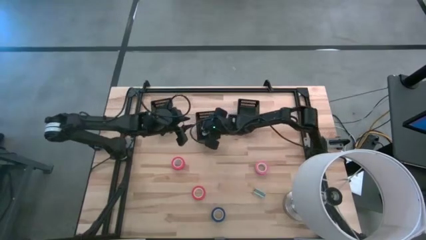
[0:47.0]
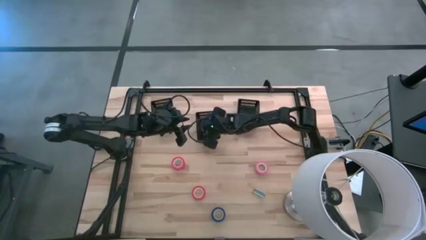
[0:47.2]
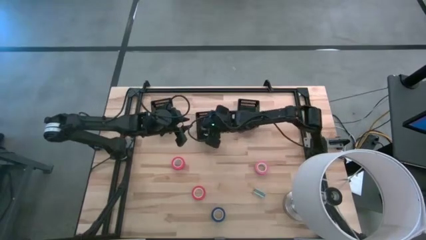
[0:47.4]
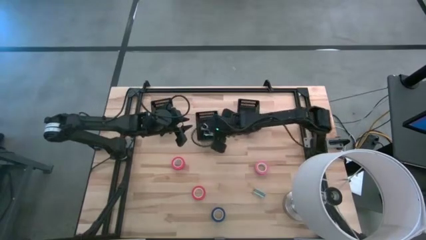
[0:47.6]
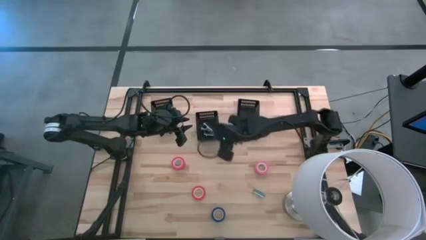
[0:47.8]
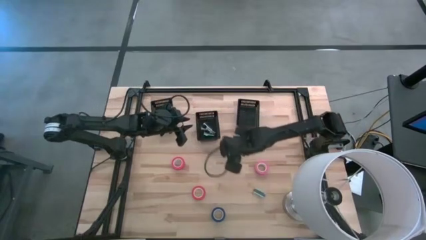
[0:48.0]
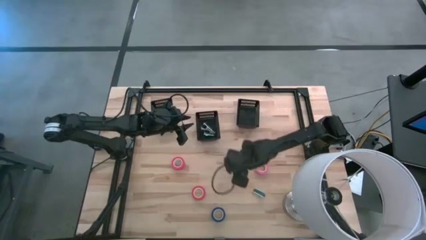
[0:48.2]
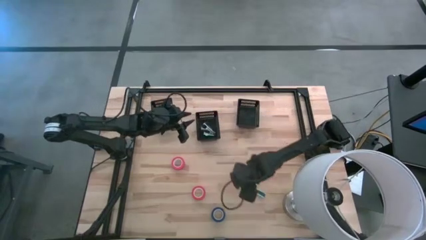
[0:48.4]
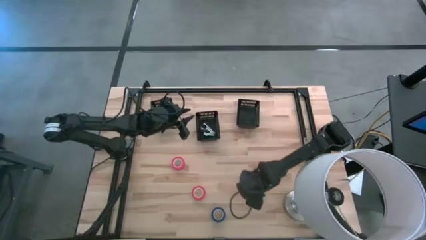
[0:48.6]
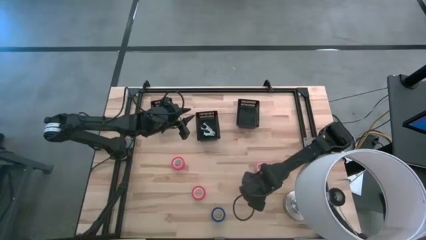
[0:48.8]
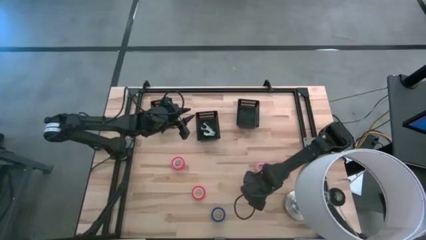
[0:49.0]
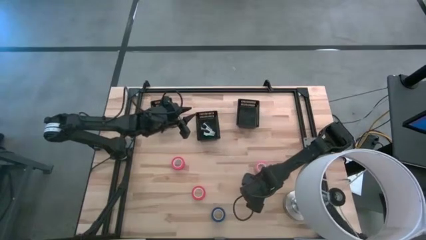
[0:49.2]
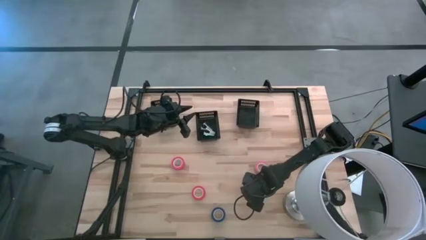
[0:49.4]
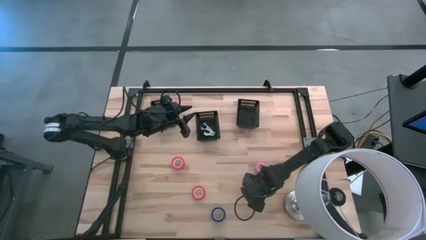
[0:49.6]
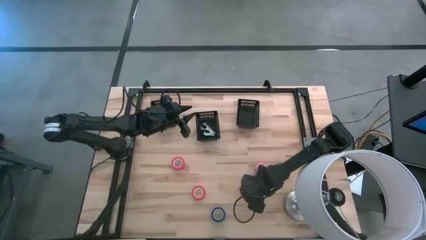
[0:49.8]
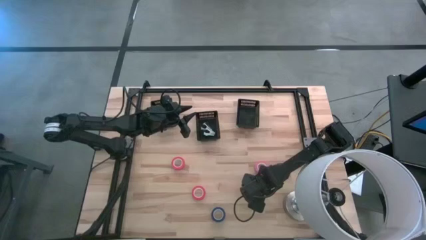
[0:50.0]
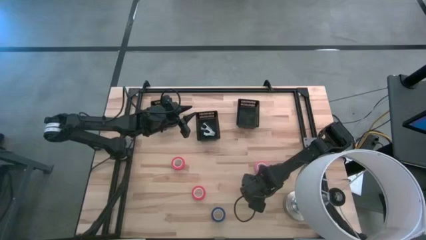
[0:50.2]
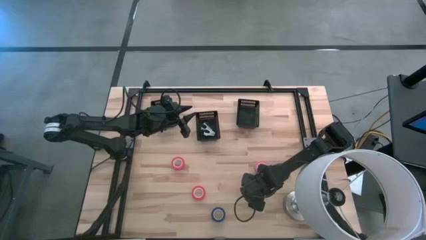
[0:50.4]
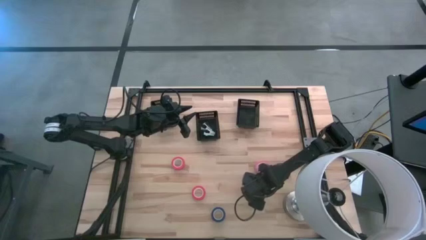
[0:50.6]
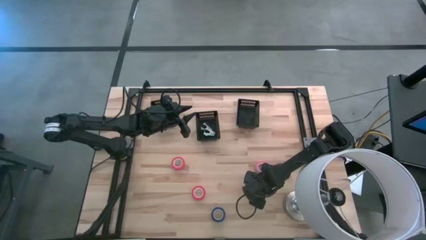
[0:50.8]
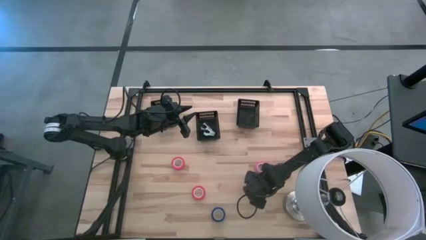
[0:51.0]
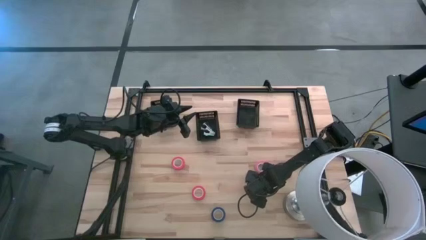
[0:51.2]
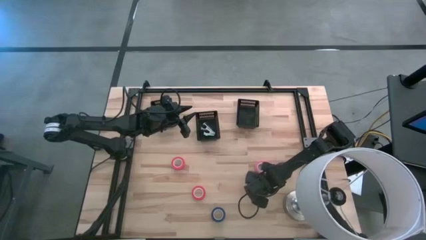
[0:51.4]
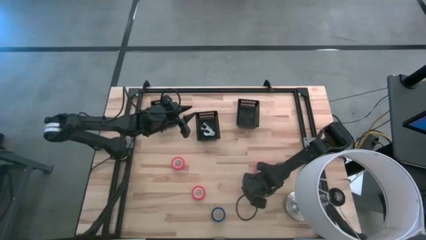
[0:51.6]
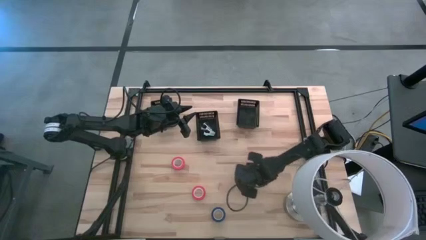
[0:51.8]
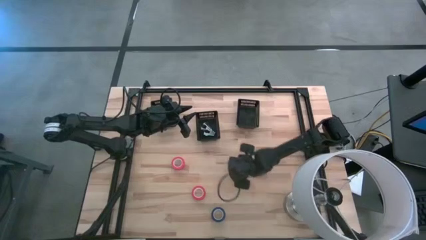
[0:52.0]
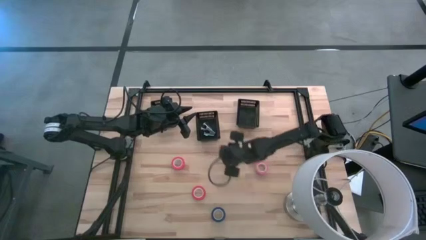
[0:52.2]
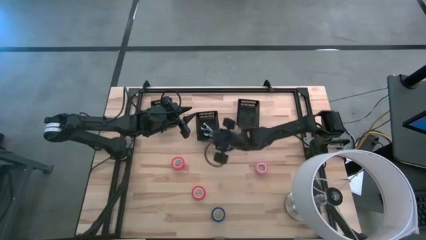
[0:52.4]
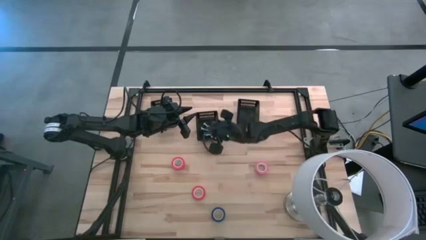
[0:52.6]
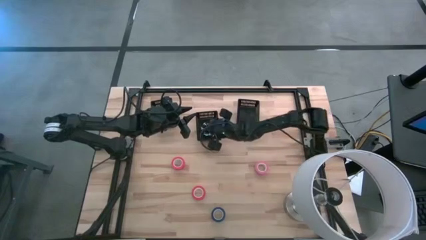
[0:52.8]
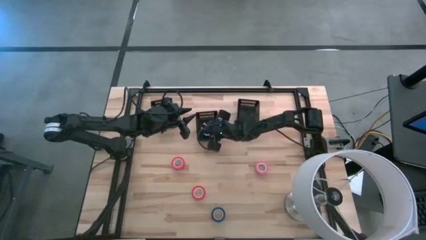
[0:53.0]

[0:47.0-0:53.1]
Task: Pick and place Stapler, Stapler remover, tape
Put the blue staple remover into the middle black bin

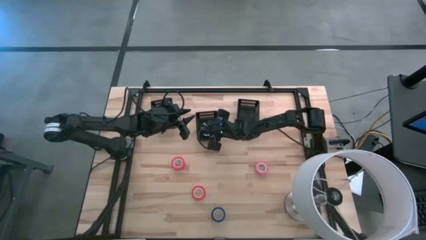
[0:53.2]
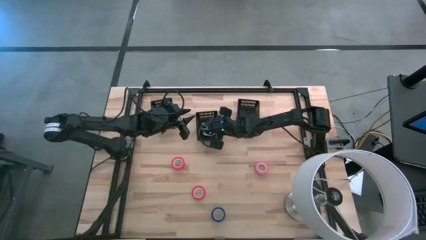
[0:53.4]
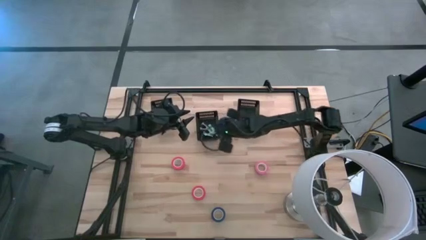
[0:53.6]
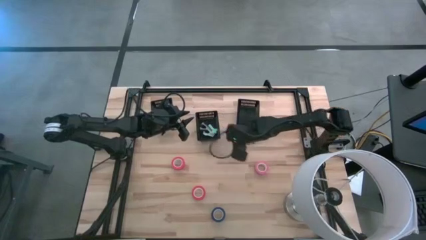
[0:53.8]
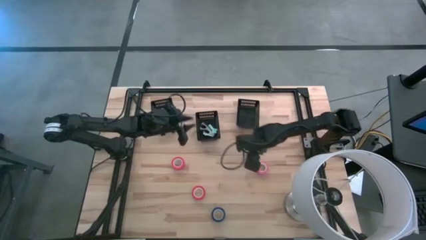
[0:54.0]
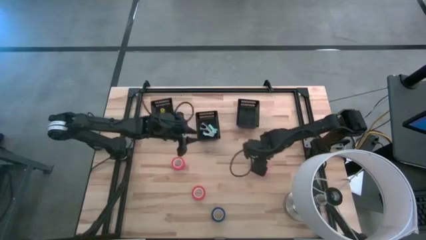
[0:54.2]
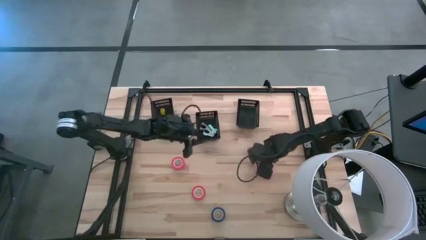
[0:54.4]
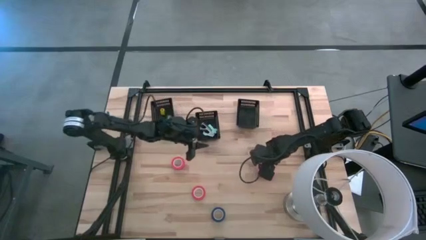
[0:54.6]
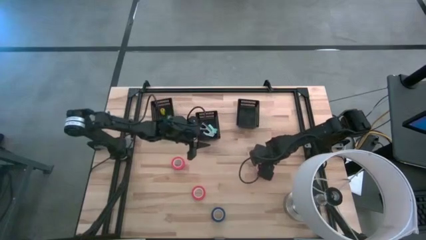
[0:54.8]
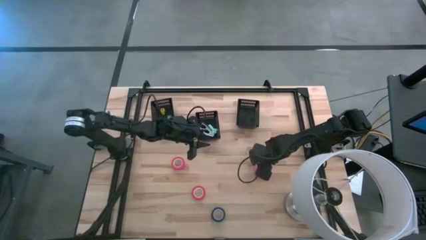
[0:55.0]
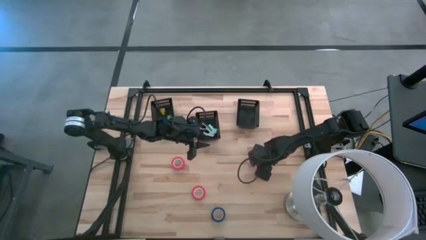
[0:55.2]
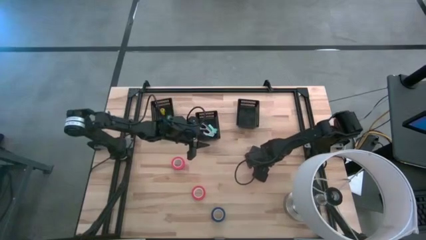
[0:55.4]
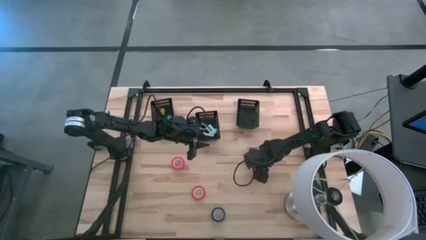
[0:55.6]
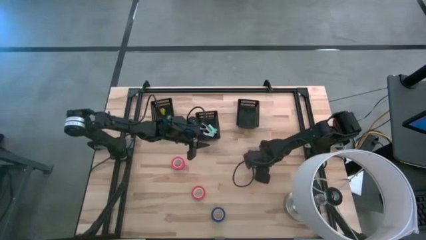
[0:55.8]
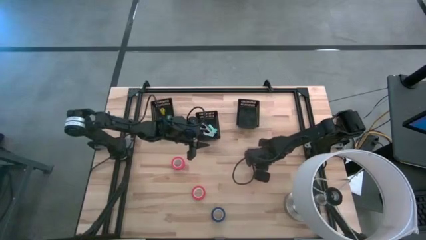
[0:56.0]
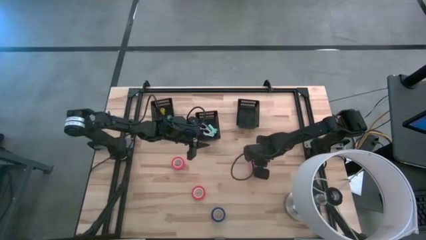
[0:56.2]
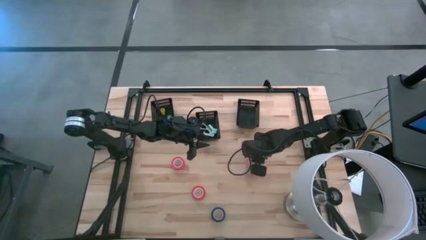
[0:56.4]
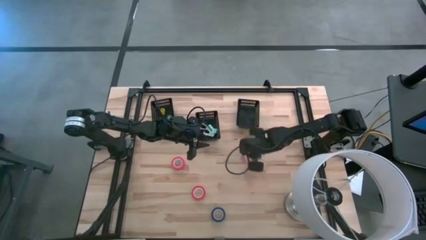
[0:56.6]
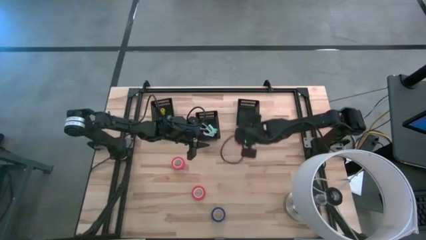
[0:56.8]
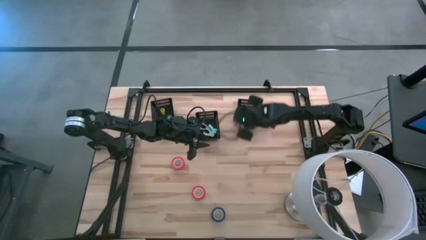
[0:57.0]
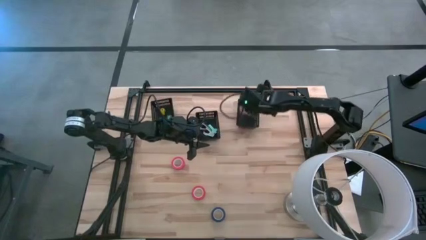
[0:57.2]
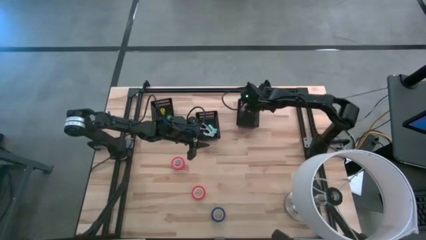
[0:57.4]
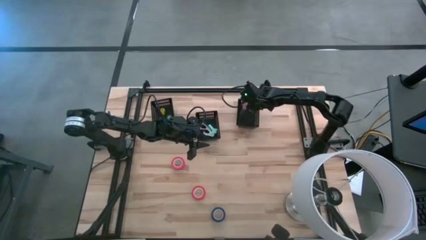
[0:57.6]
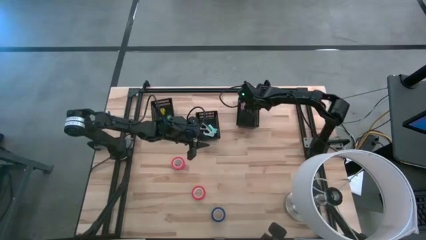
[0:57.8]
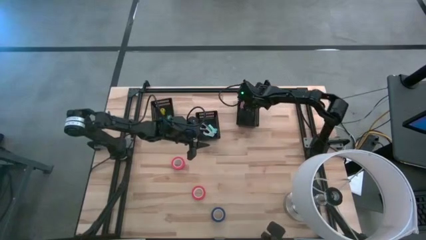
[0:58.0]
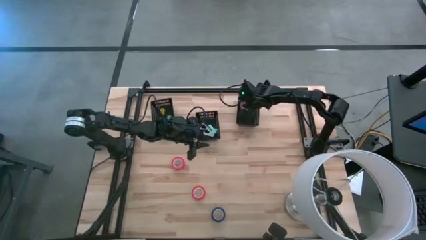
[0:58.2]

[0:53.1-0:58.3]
Put the pink tape into the right black bin

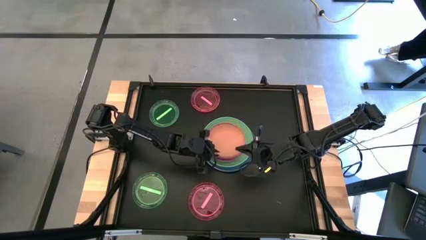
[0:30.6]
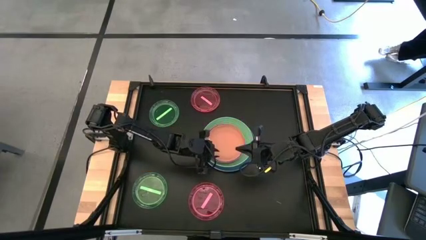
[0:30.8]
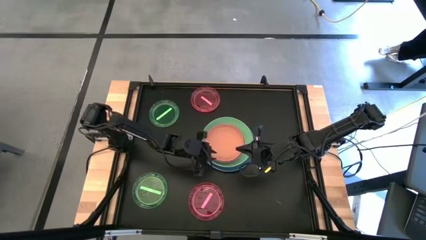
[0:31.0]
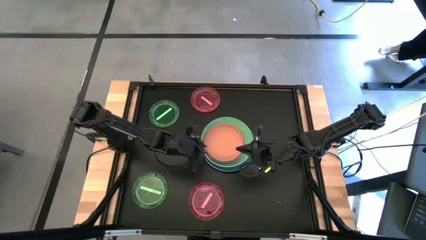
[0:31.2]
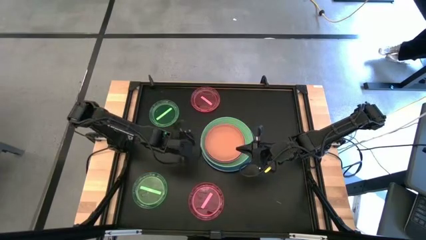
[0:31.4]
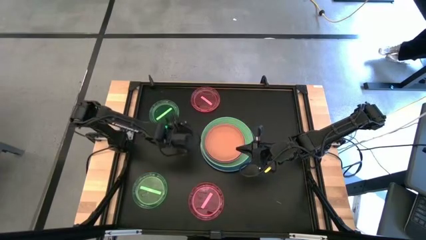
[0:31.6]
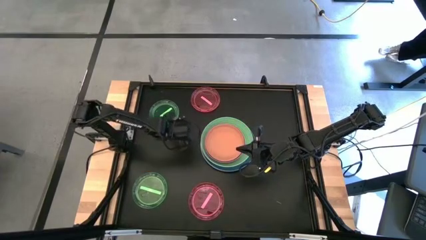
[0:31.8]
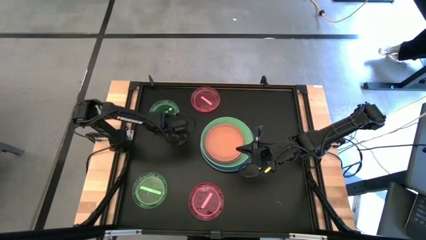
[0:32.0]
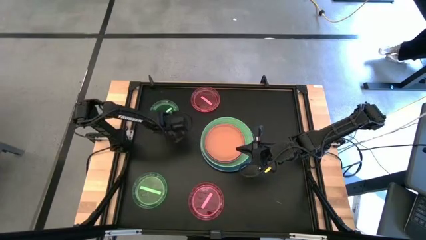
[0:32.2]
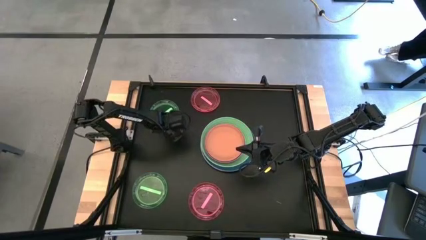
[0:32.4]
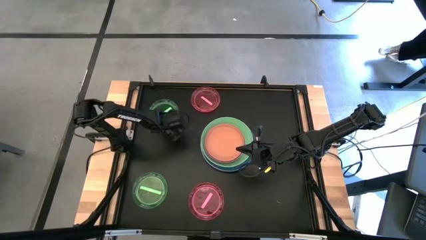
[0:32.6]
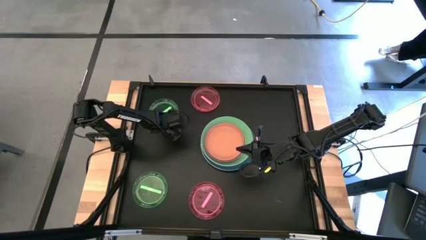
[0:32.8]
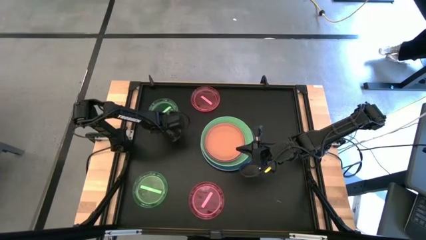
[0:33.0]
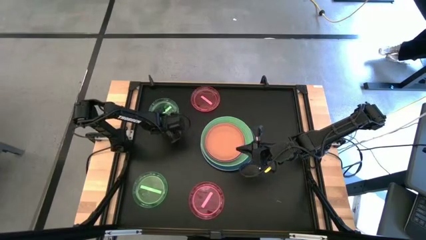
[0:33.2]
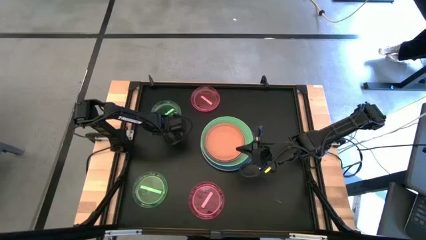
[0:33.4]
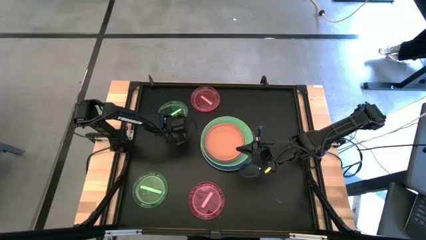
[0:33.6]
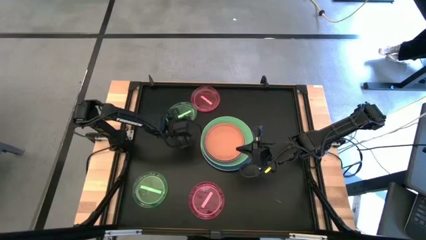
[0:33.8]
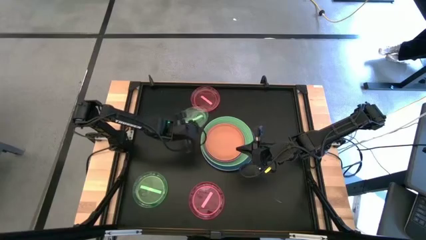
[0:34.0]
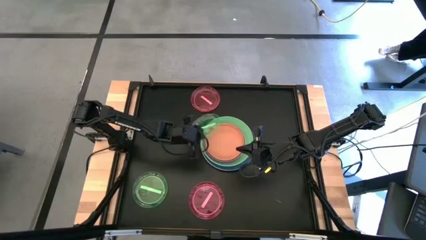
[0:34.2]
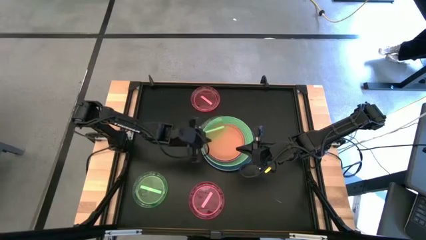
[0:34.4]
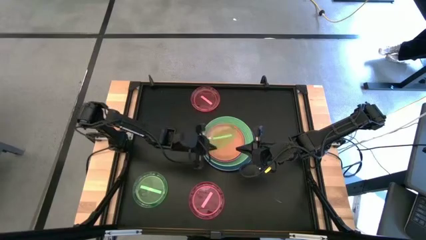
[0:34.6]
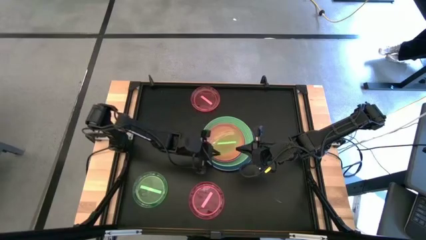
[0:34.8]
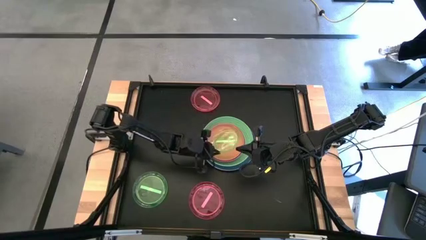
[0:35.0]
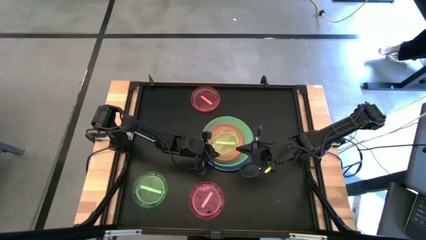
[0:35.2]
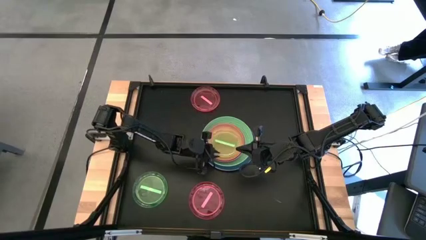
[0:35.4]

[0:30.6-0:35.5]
Task: Stack plastic plates
Stack the top light green plate on top of the orange plate
